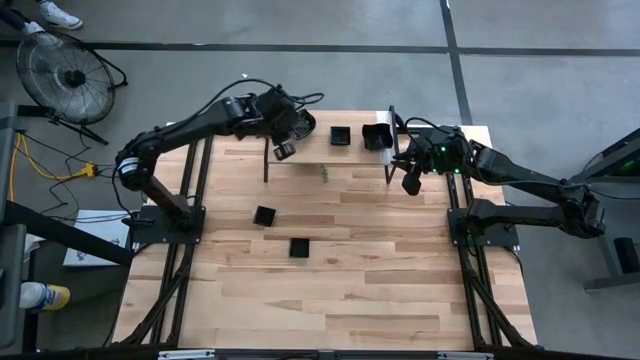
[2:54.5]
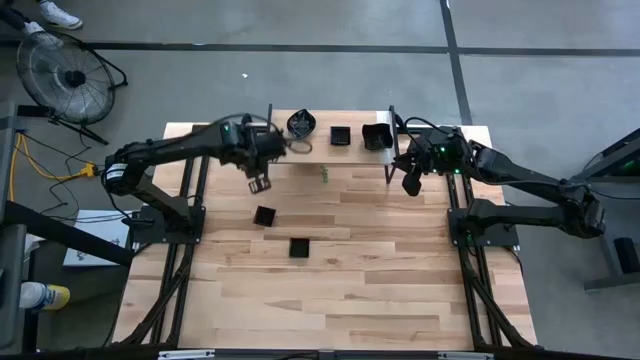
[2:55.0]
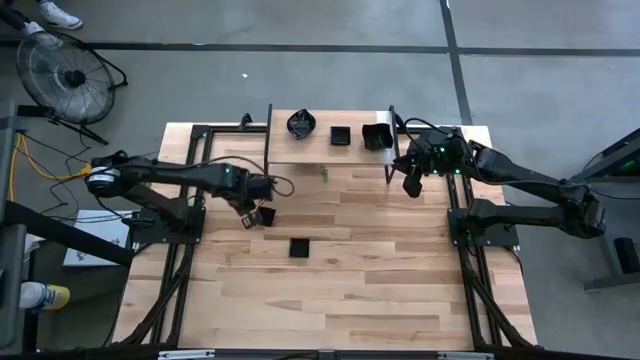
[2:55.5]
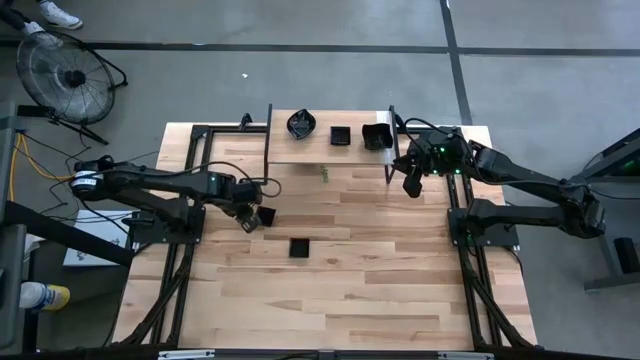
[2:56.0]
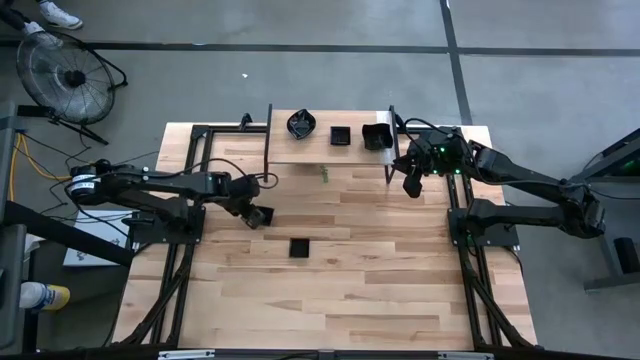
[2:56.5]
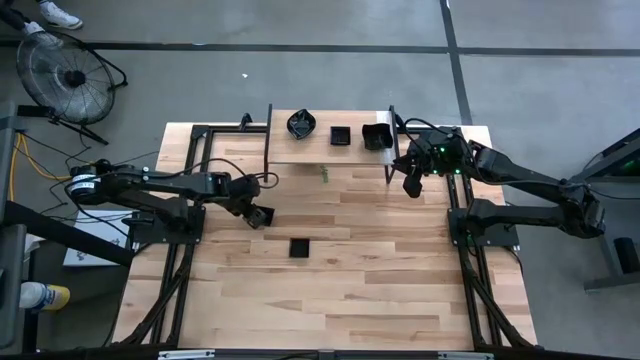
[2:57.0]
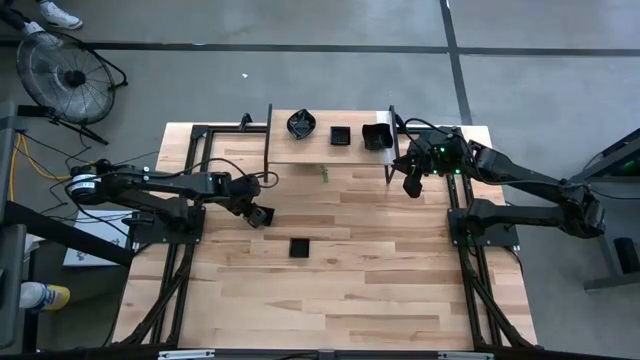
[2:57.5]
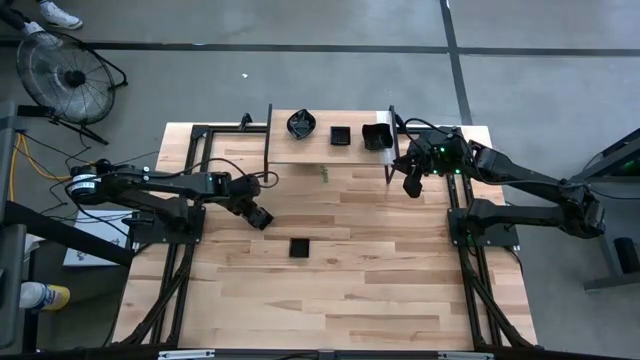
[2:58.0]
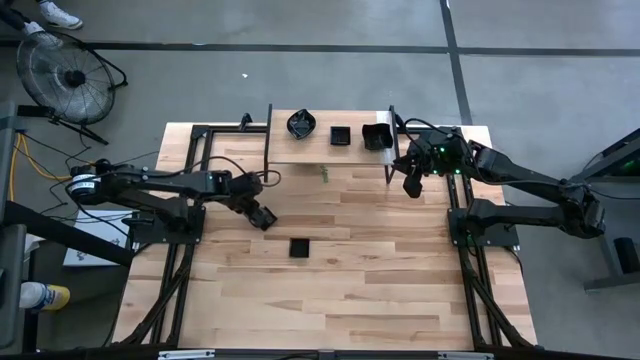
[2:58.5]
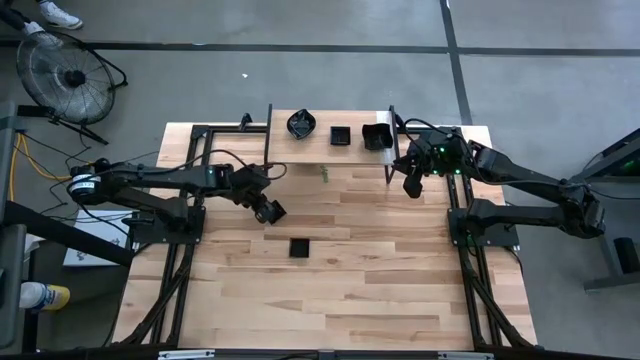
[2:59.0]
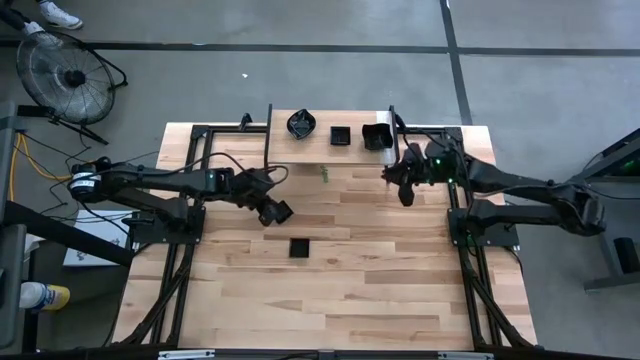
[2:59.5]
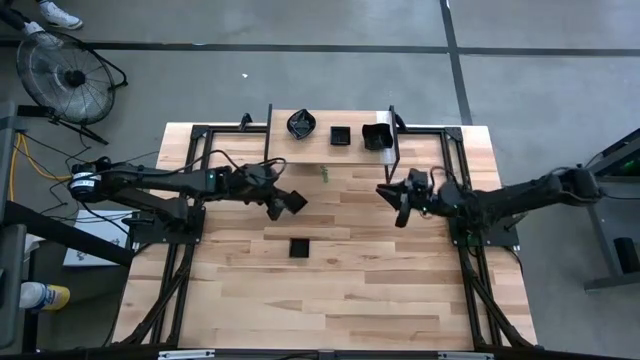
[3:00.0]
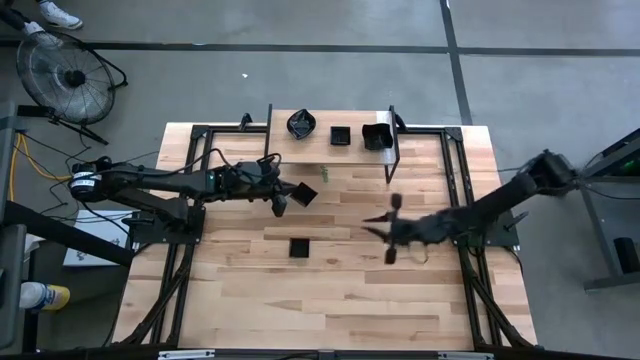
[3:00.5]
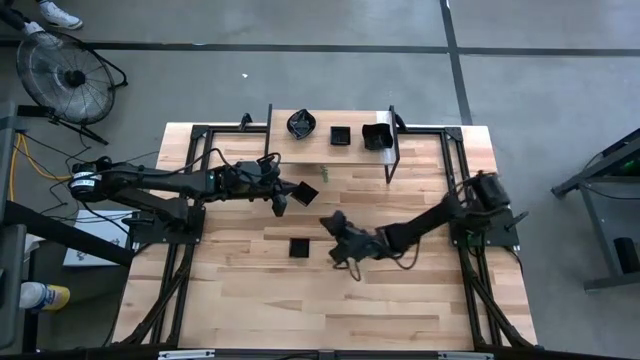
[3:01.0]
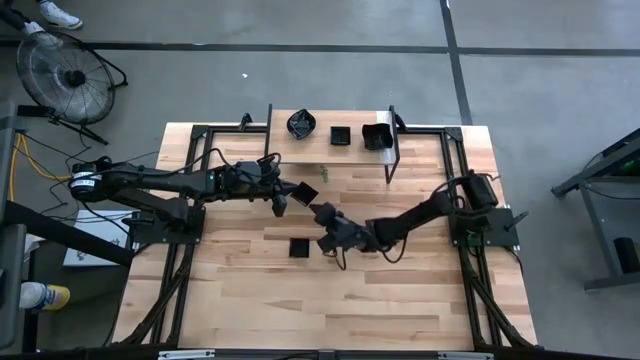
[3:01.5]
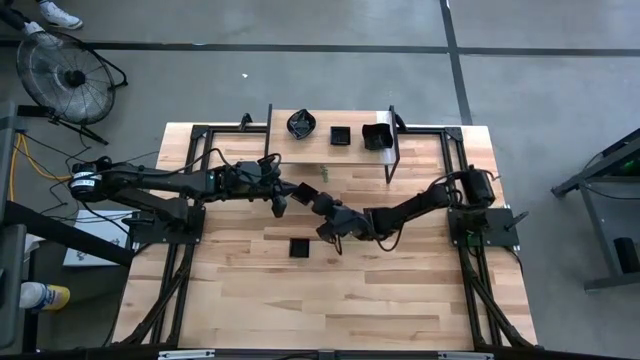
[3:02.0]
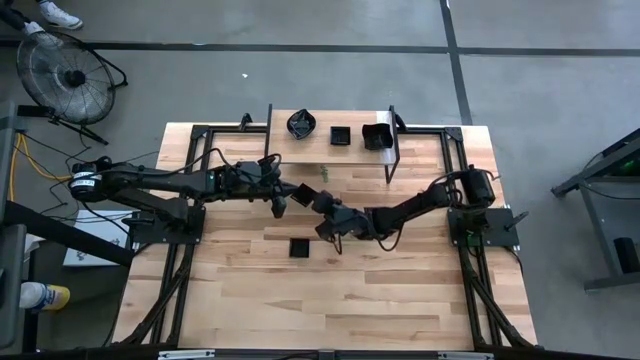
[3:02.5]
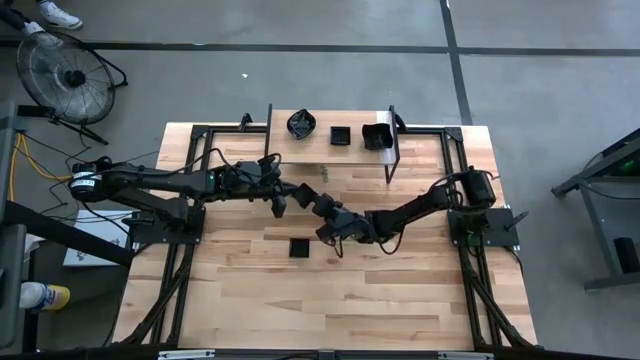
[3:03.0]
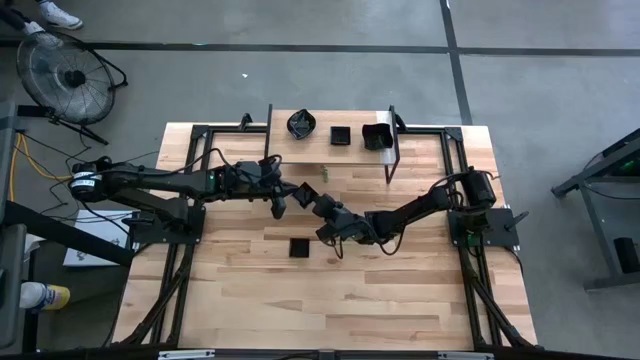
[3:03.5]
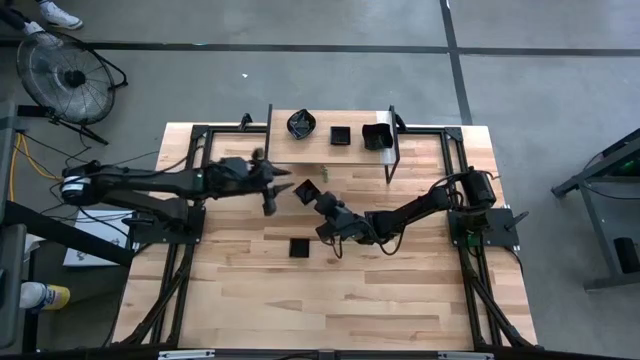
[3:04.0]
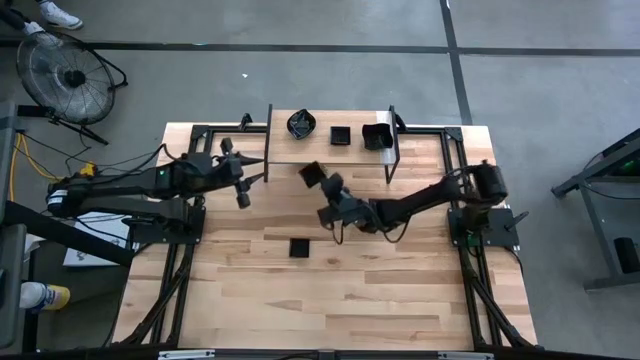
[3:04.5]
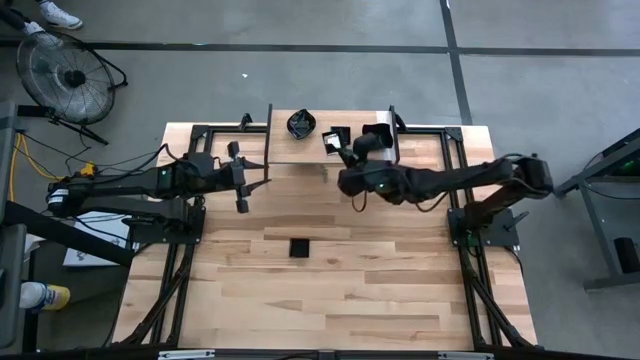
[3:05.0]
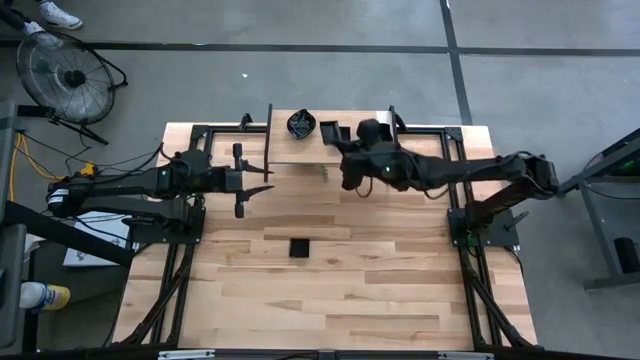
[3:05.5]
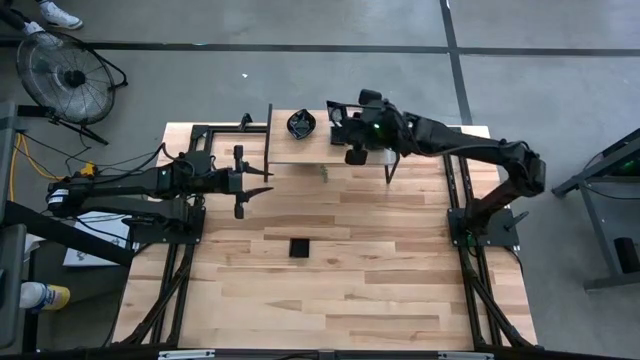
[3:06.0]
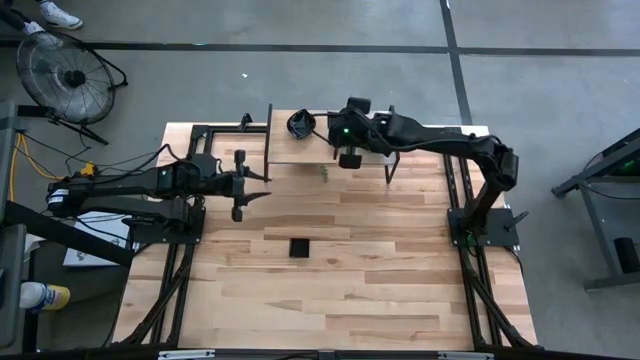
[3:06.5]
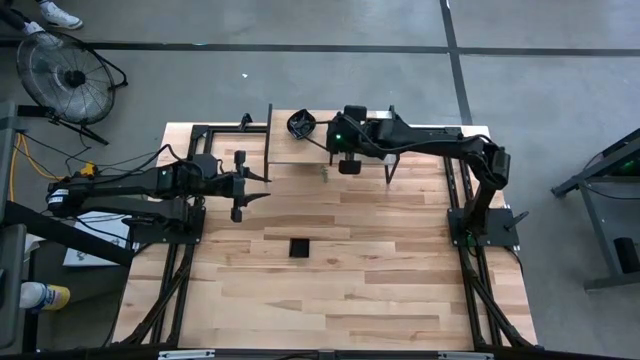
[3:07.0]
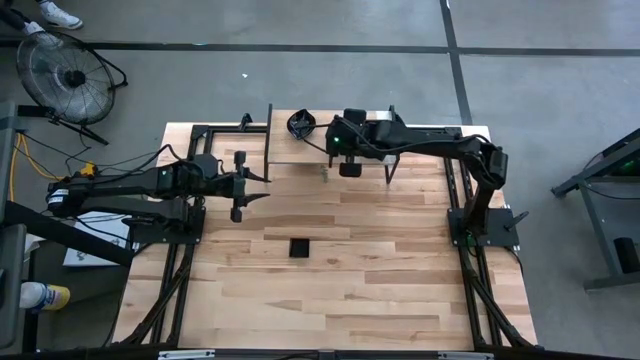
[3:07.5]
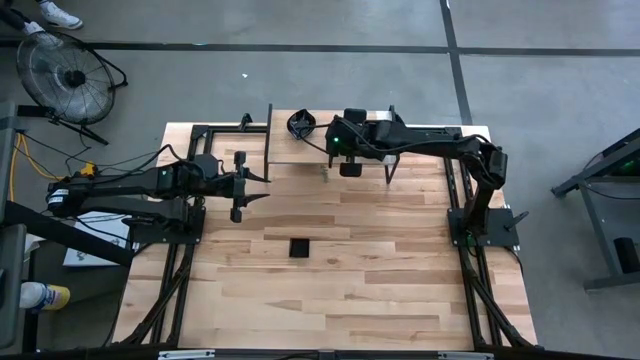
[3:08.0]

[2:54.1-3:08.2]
Task: Pick & Place Mini shaped plates
Stack the square plate on top of the other square plate on the shelf

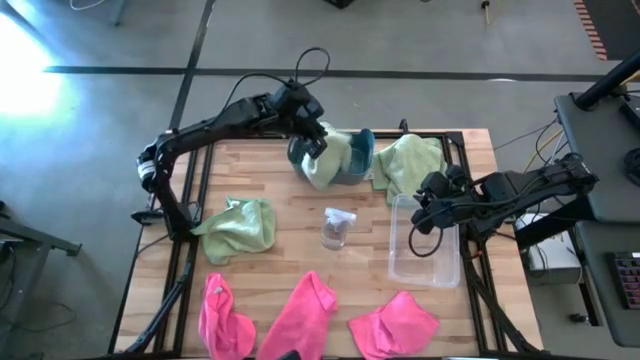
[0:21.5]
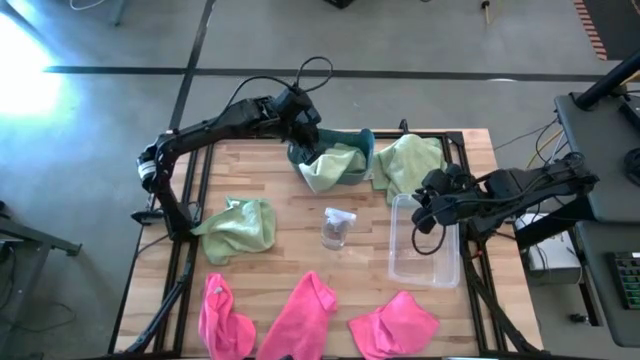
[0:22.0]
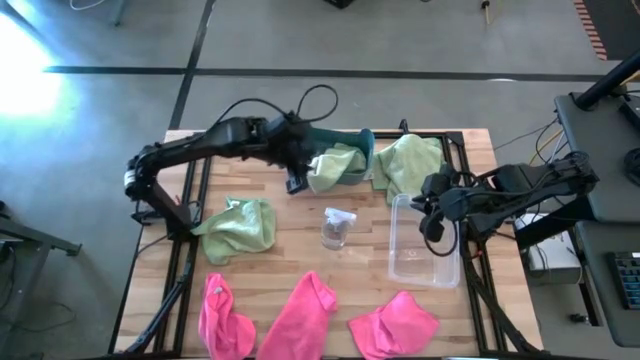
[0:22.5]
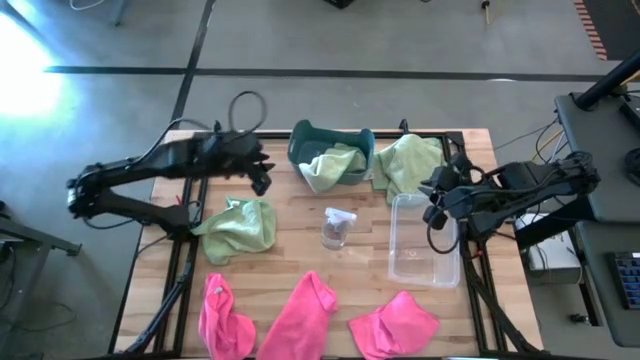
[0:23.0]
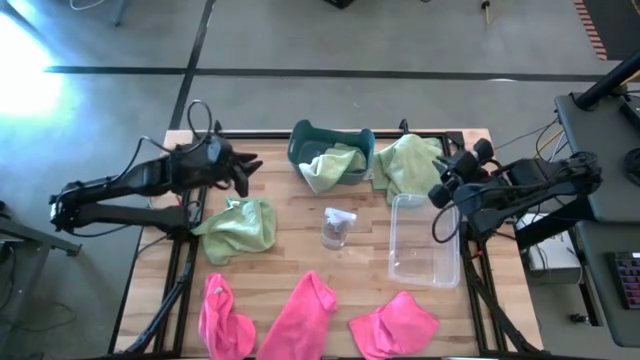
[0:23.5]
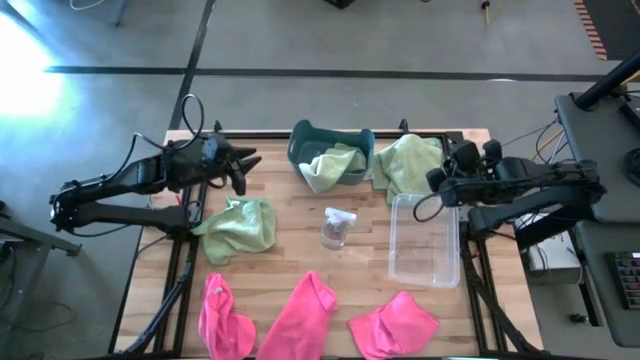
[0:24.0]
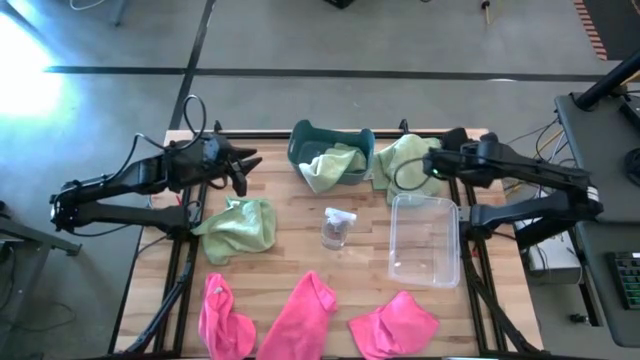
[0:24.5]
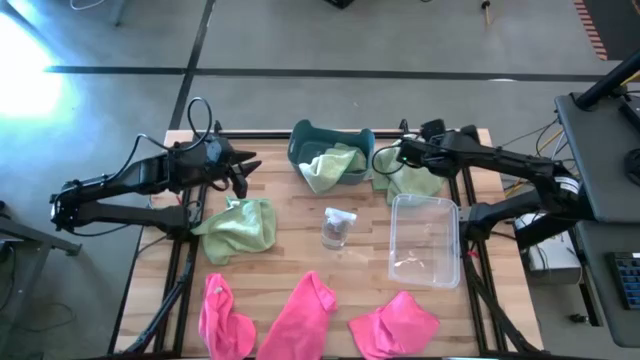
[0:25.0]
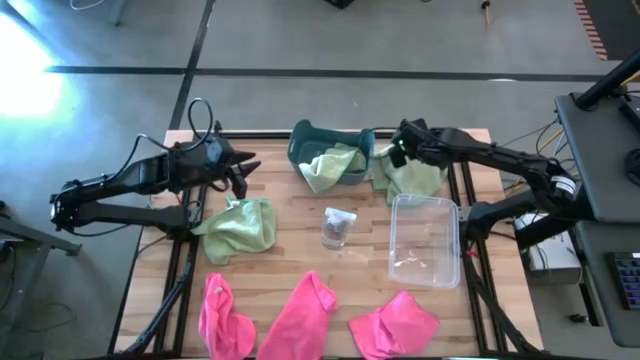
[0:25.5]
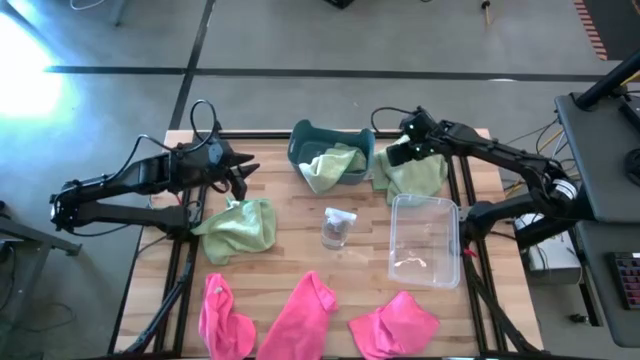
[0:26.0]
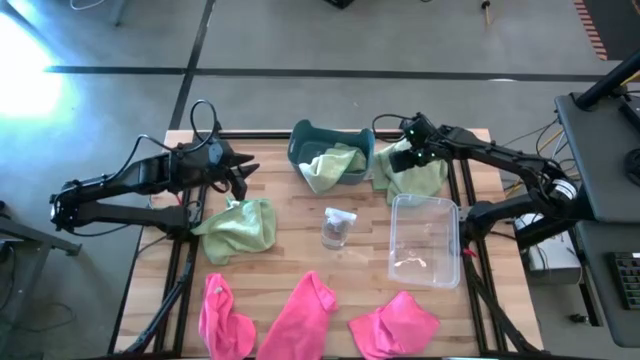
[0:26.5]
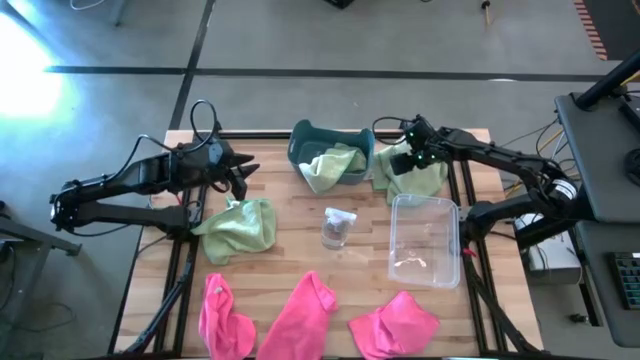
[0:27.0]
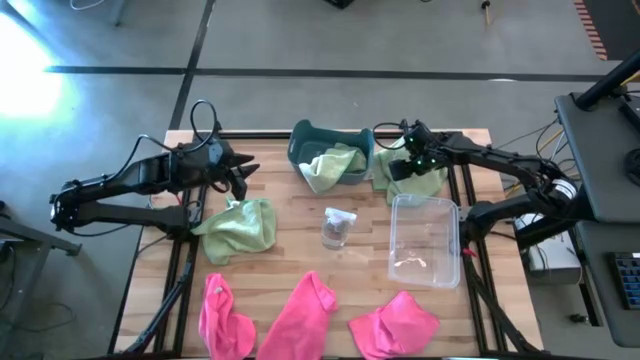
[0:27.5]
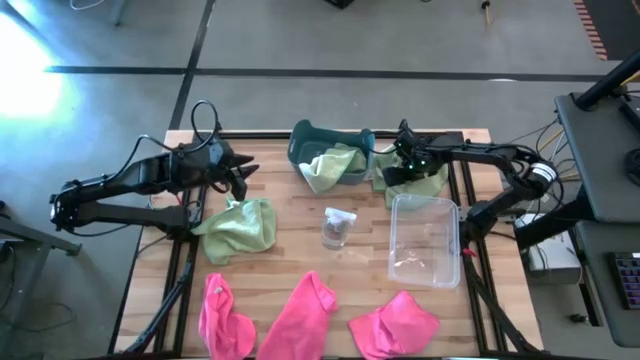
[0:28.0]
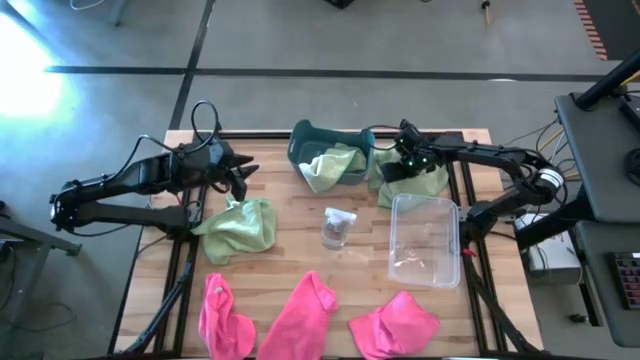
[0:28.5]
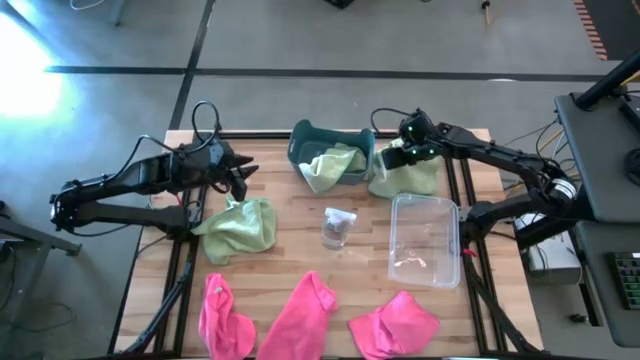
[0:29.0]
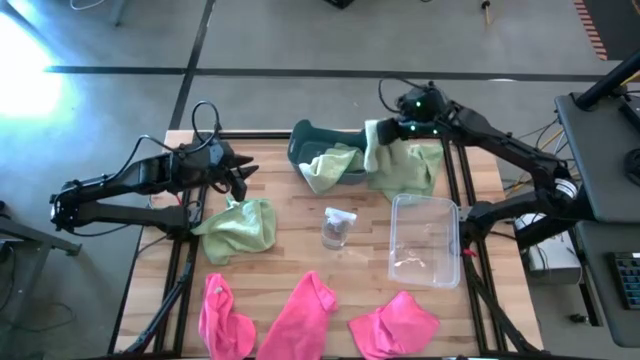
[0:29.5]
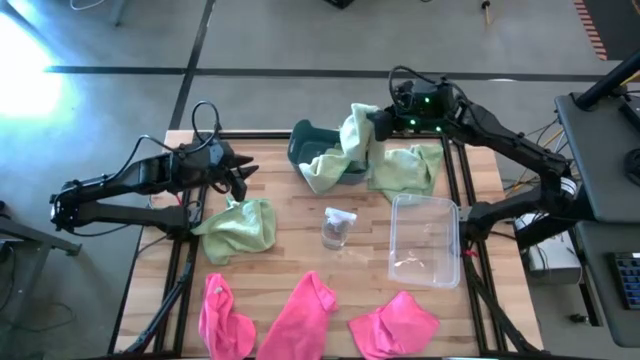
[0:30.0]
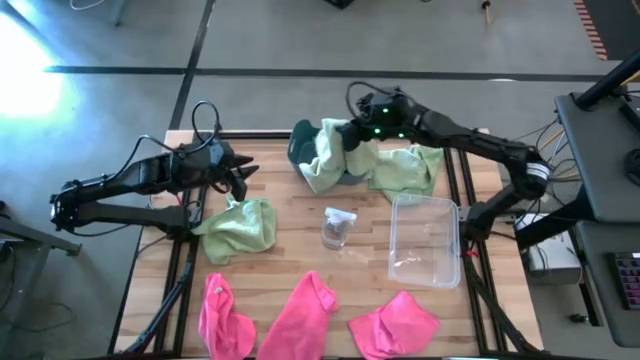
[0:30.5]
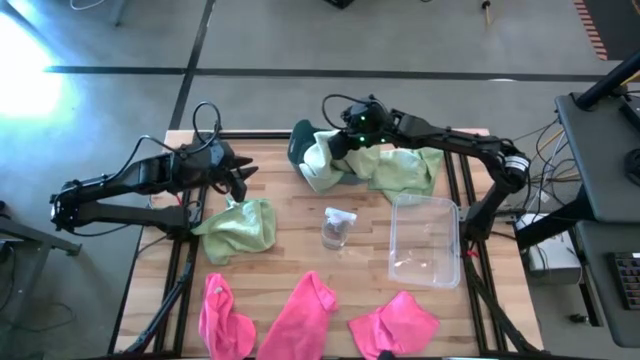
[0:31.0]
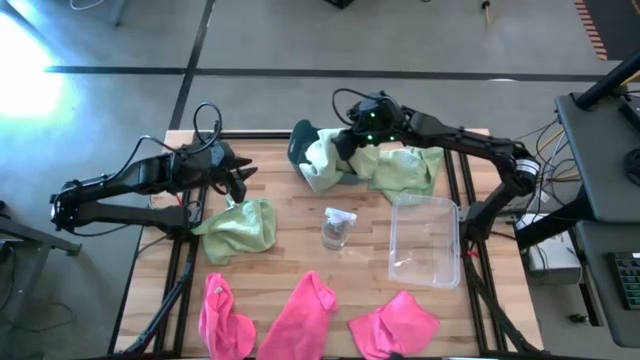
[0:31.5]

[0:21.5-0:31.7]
Task: Sort microfiber towel by color & place in baskets
Put the green microfiber towel into the blue bin
